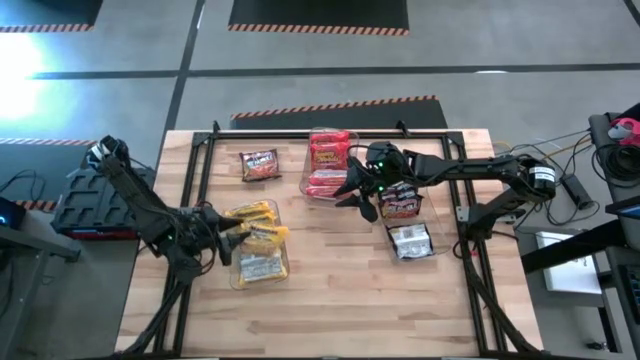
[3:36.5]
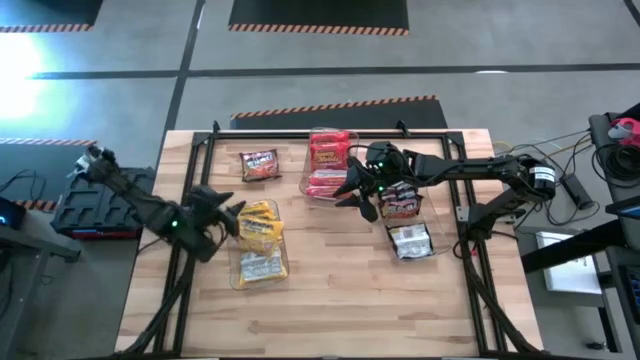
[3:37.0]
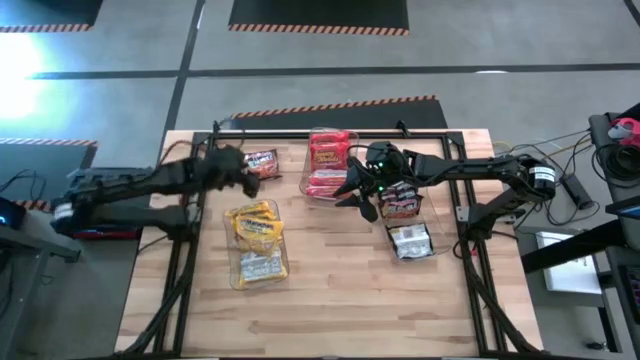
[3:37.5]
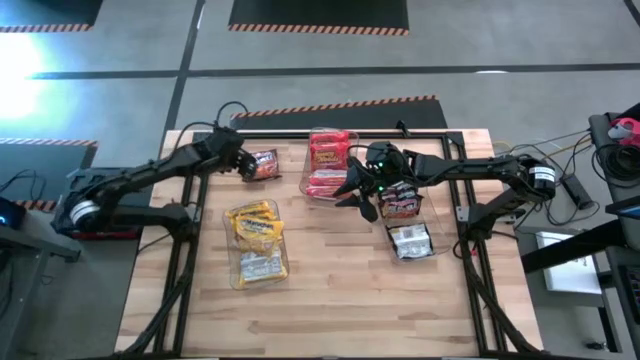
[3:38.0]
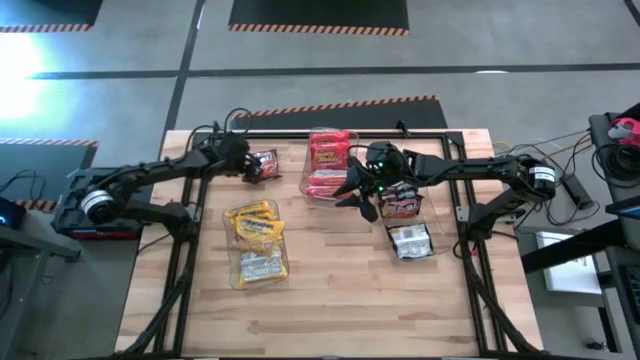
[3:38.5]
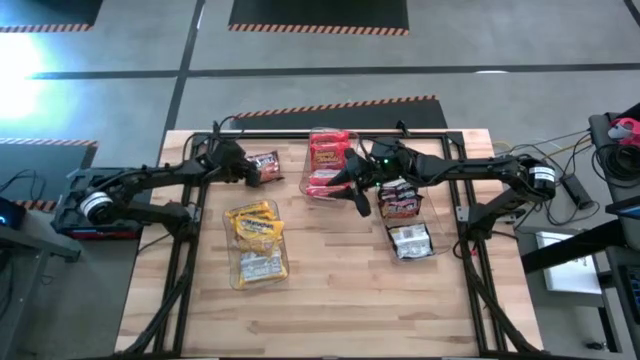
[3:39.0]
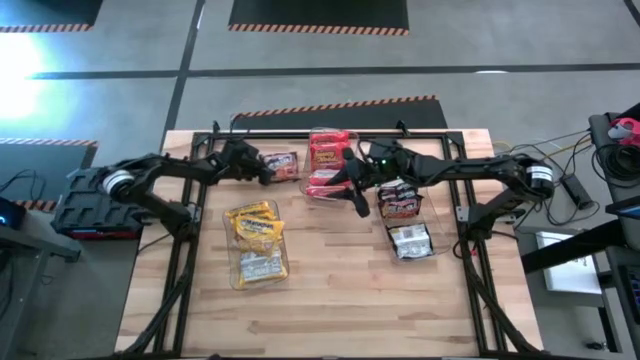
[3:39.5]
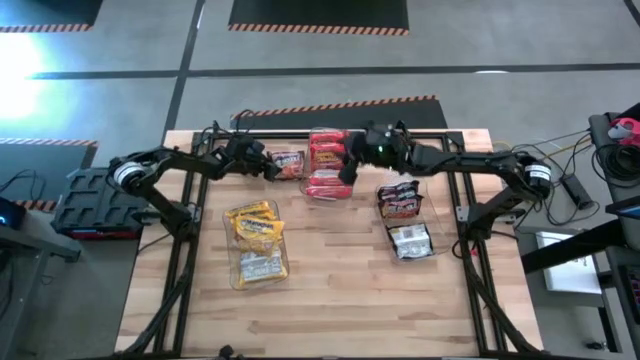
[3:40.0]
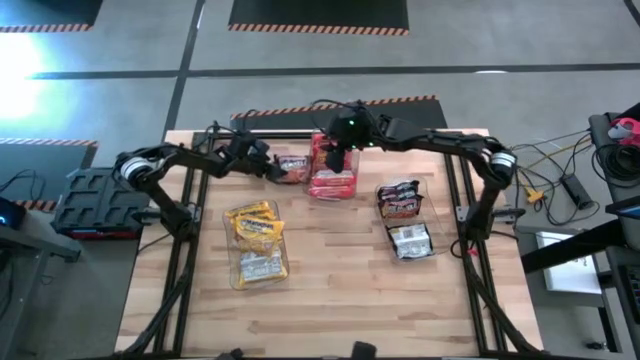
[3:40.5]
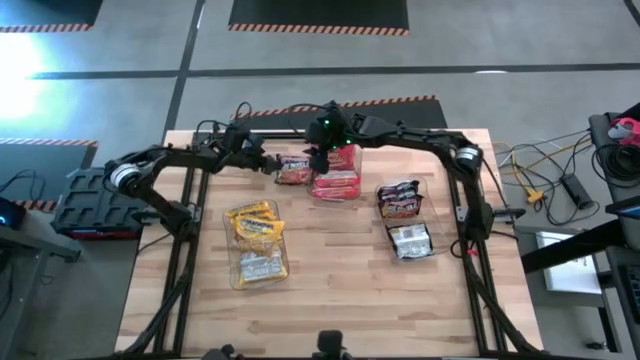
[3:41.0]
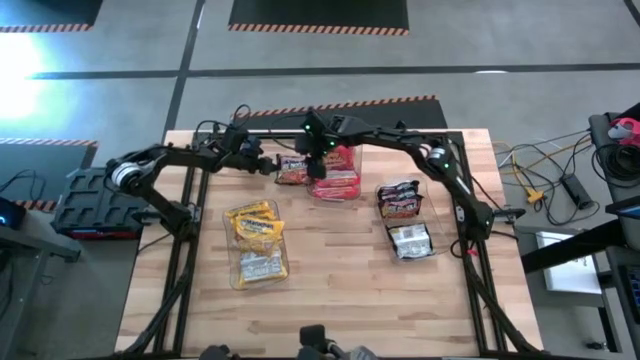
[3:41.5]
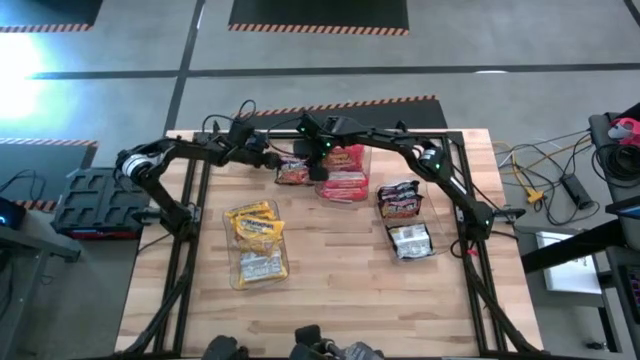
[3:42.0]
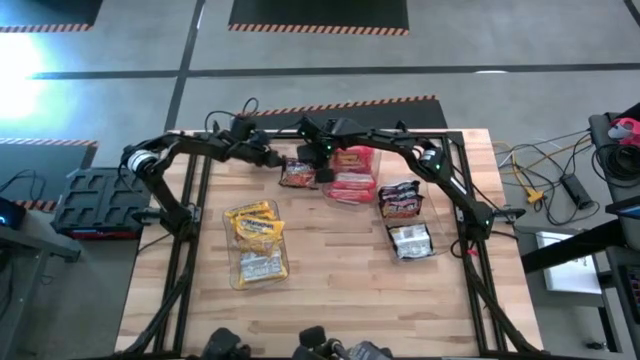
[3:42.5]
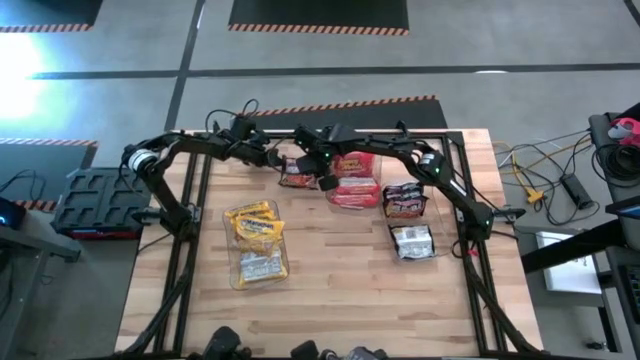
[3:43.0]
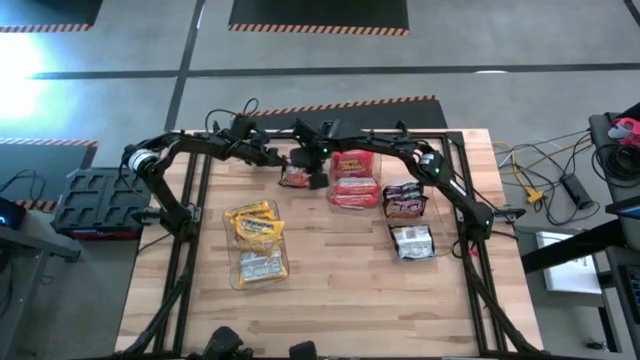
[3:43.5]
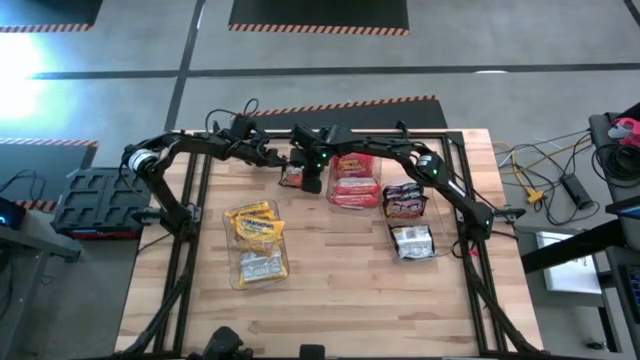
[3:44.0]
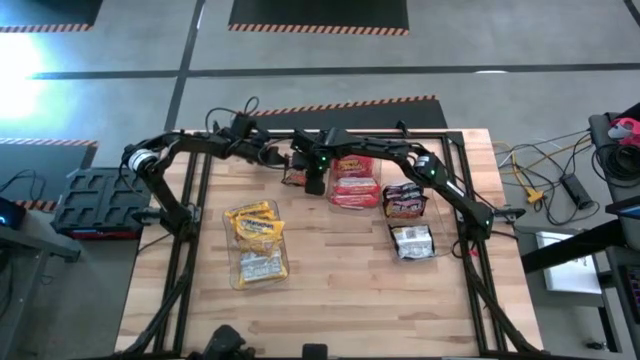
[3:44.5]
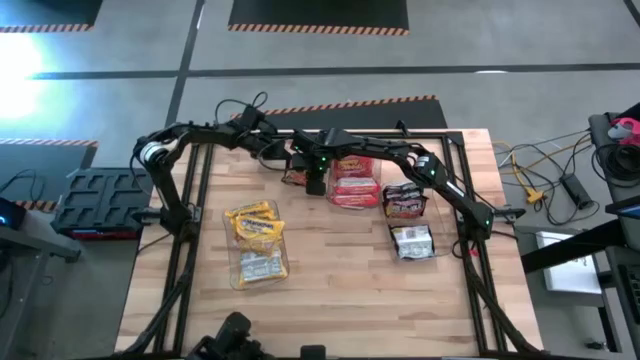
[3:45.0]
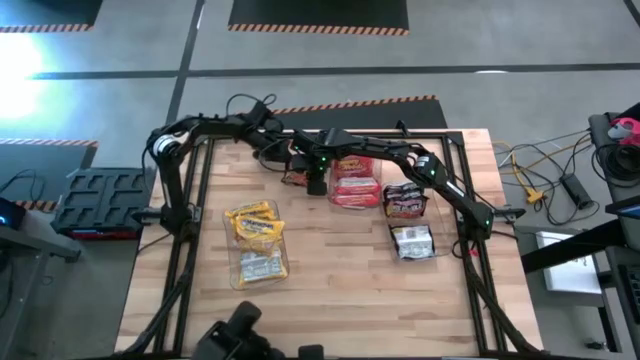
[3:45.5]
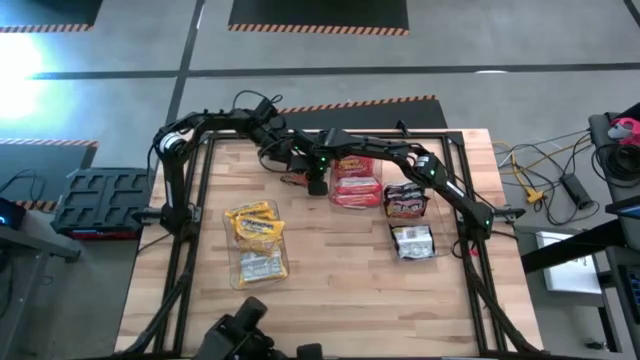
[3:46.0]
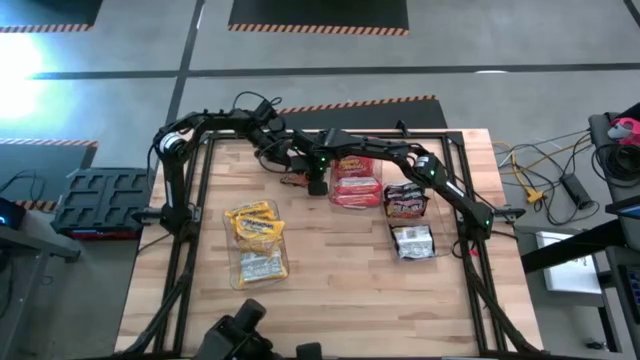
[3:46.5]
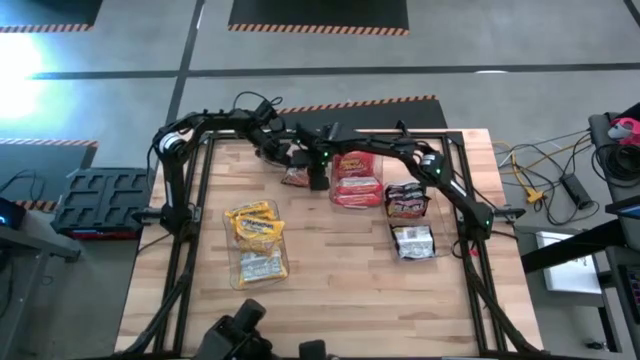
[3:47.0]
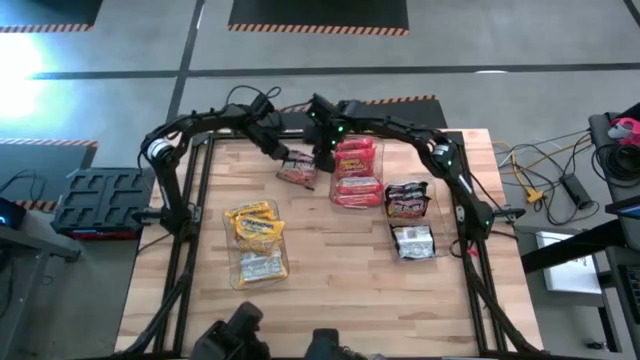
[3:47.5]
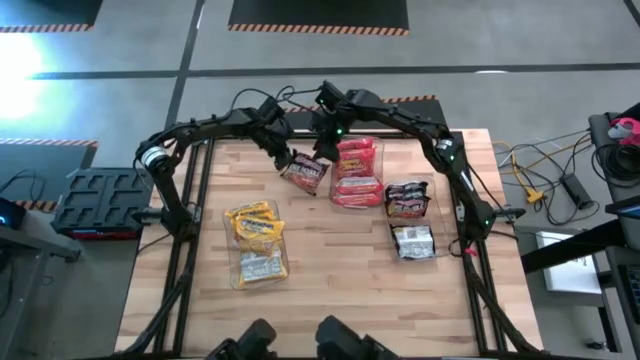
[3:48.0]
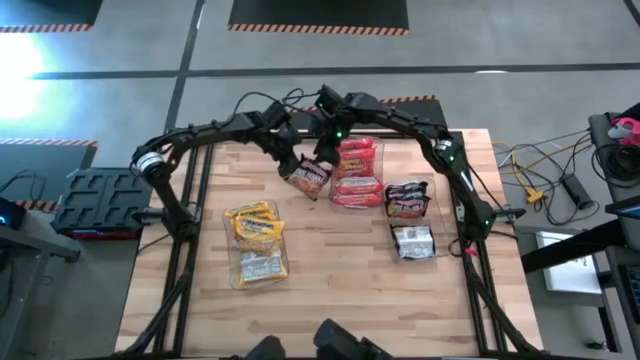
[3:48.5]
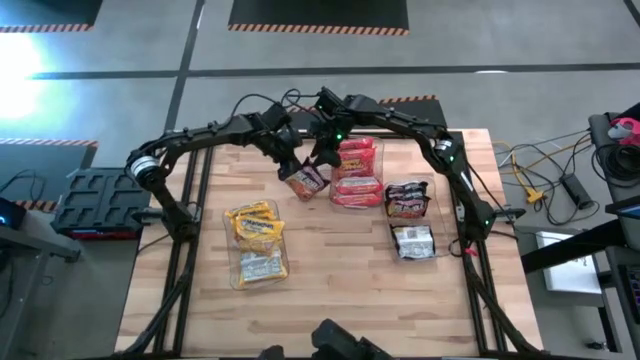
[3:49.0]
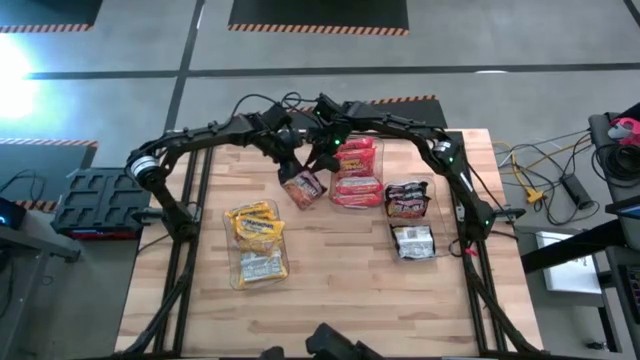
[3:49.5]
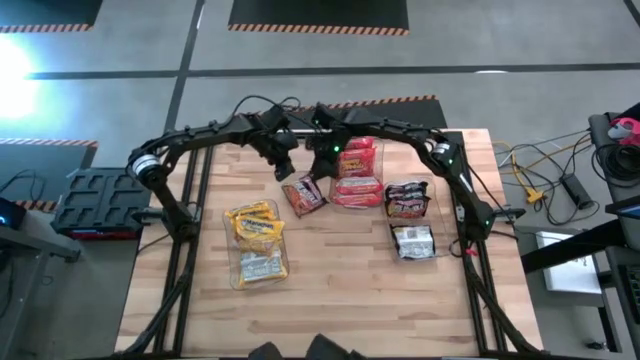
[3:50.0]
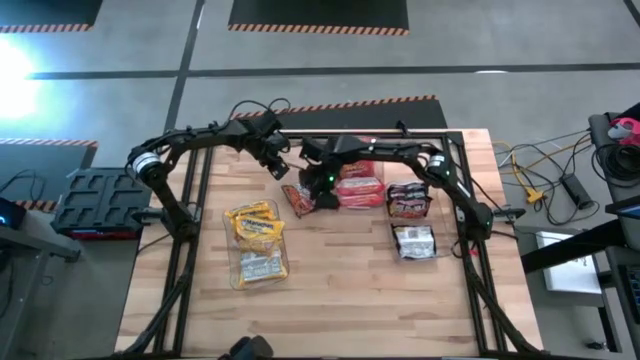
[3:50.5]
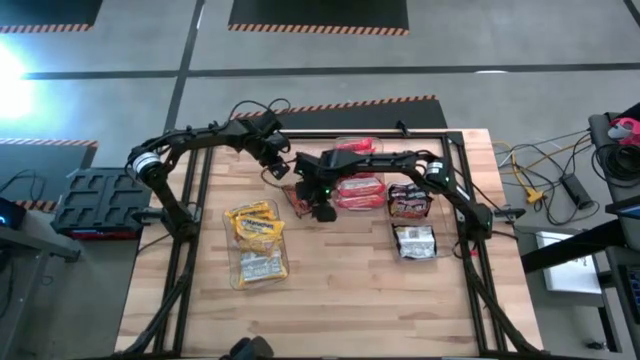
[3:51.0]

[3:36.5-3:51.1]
Task: Sort Maruchan noodles
Put the black pack noodle into the bottom right transparent bin

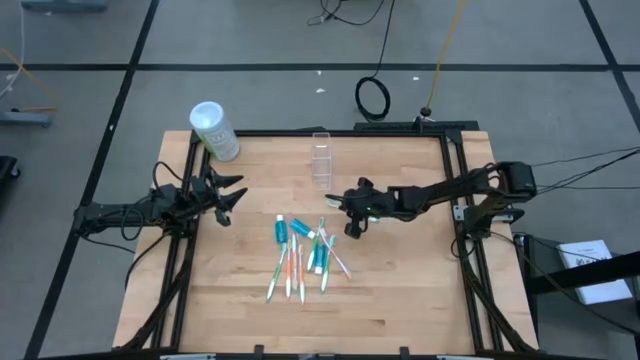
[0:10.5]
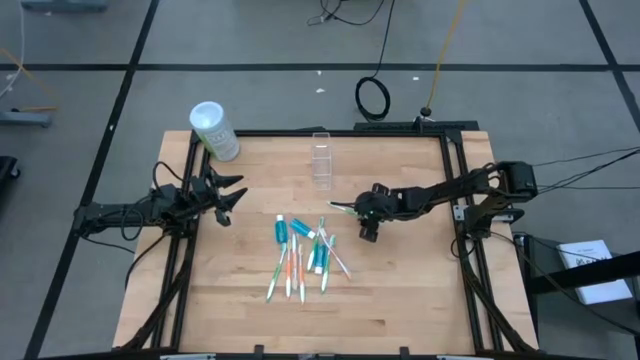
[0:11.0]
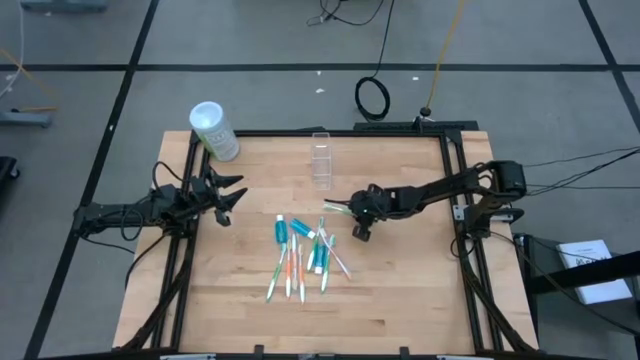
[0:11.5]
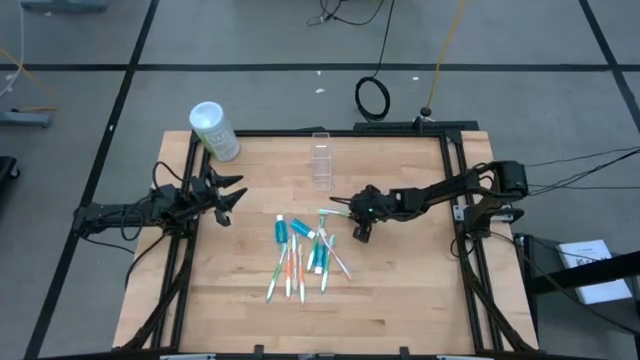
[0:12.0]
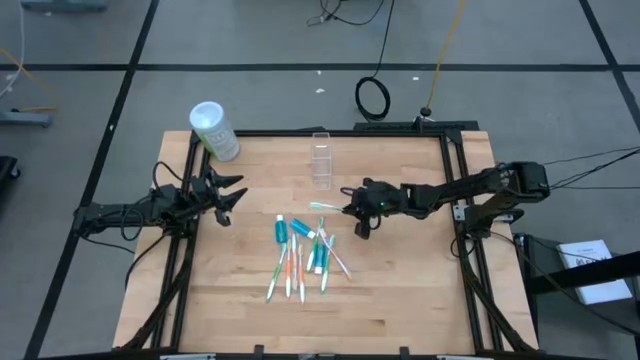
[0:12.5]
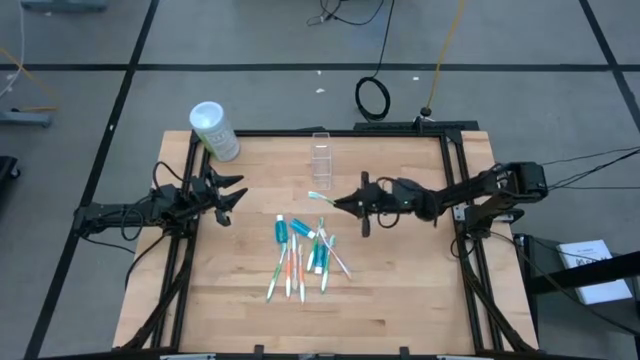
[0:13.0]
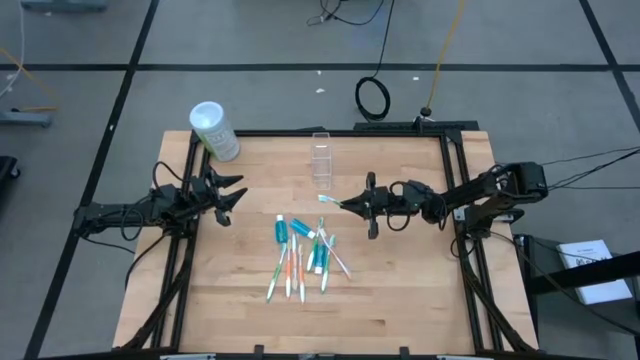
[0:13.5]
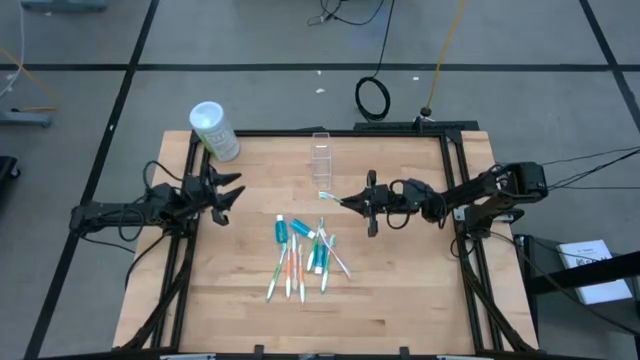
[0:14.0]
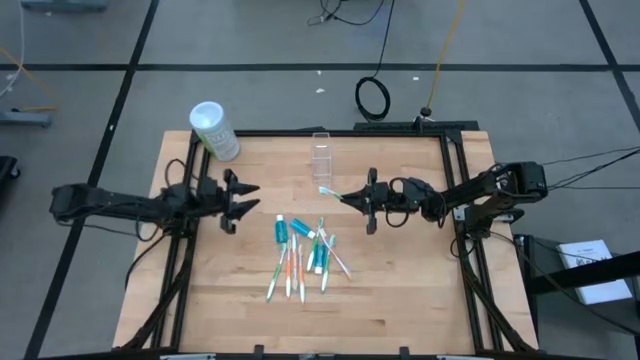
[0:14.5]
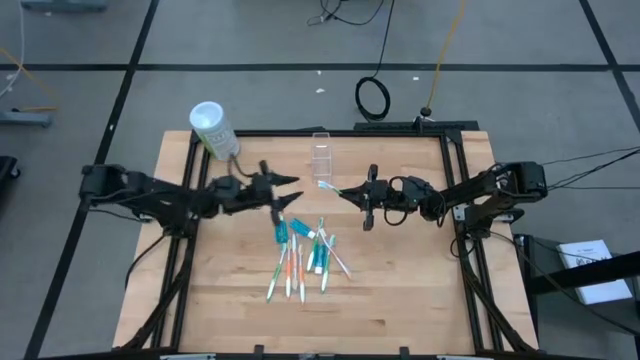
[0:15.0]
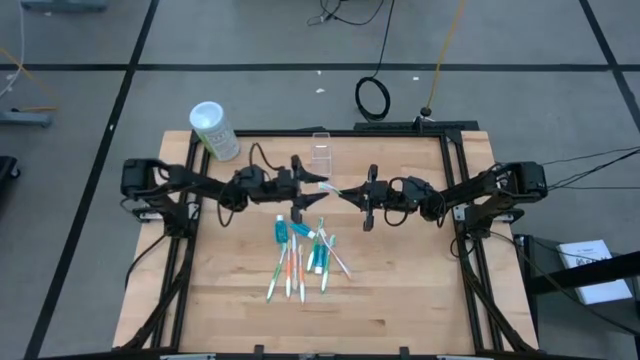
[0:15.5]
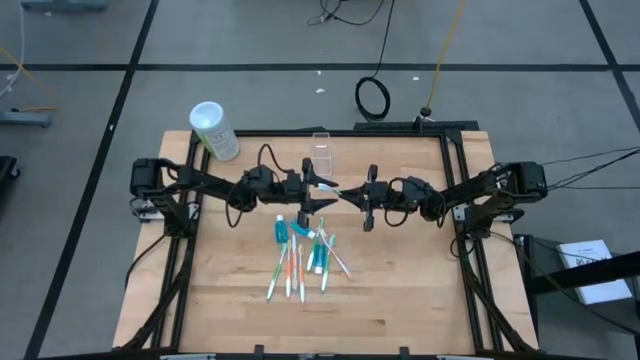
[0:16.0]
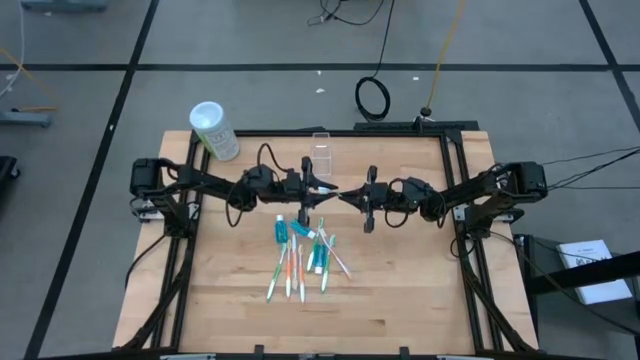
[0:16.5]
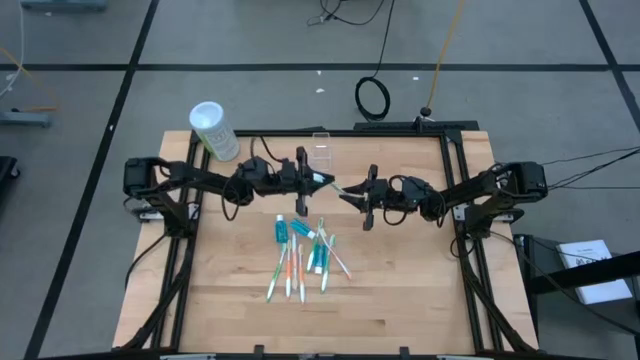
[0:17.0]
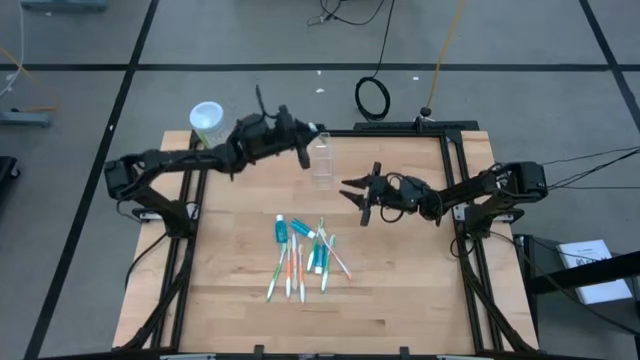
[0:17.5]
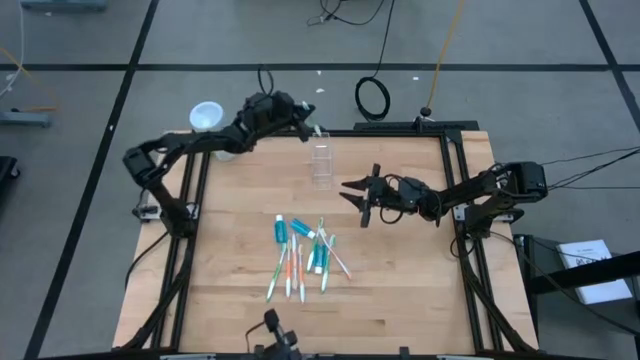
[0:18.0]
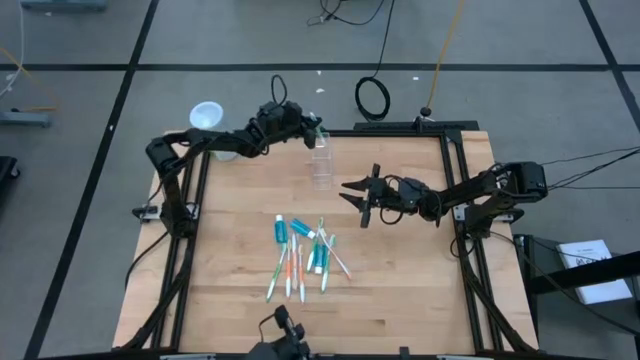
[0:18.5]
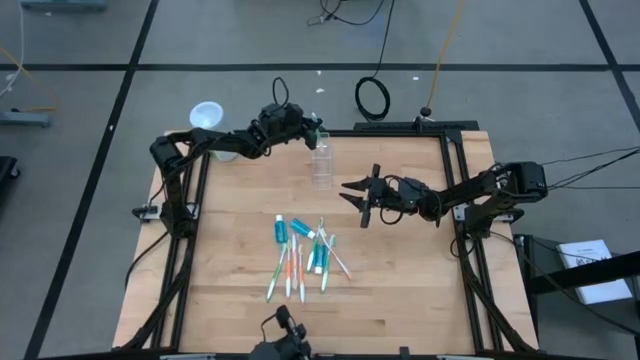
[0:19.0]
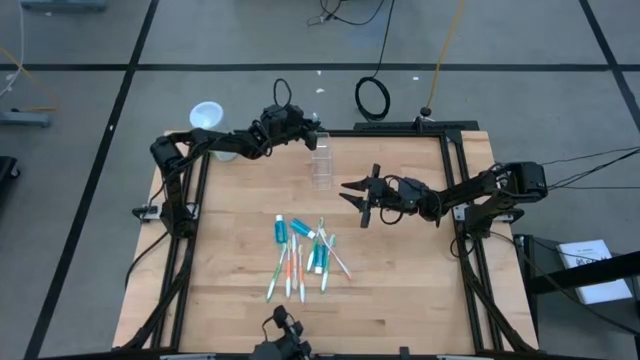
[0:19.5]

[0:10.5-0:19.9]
Task: Pick & Place toothbrushing station
Put the green toothbrush into the transparent organizer
